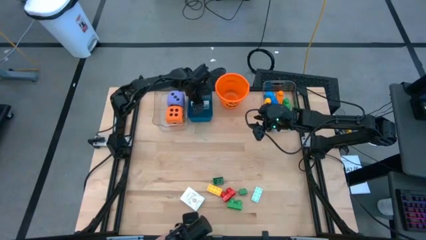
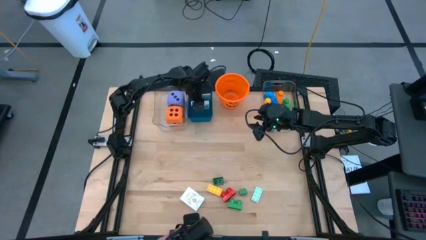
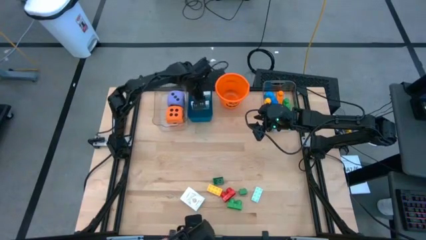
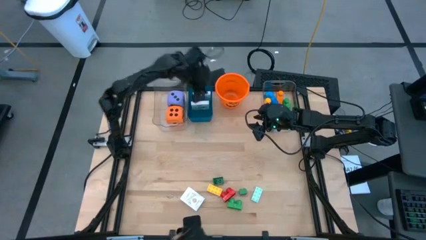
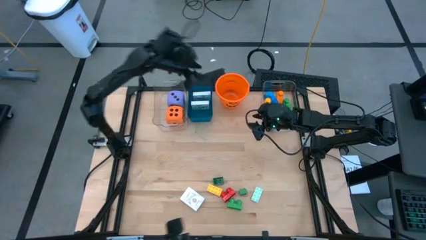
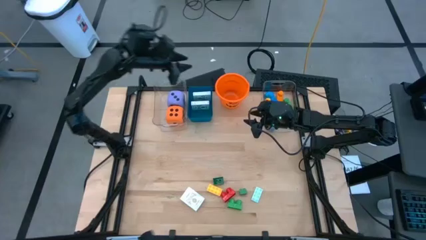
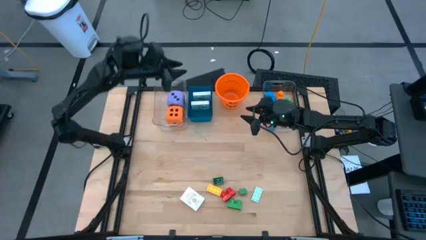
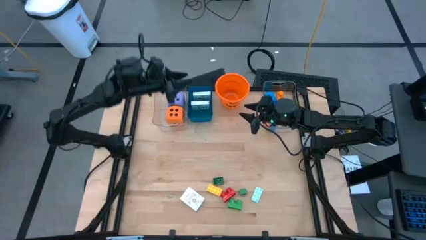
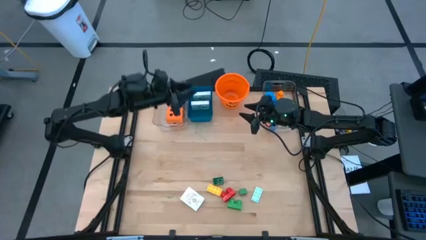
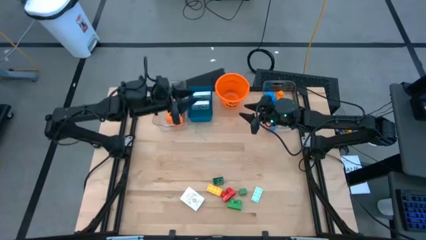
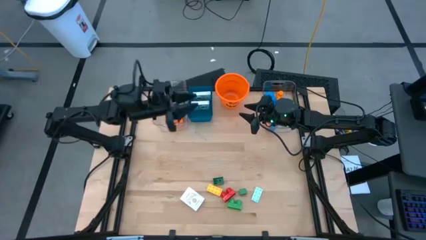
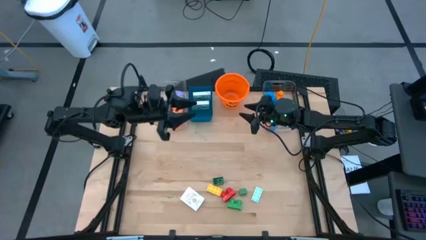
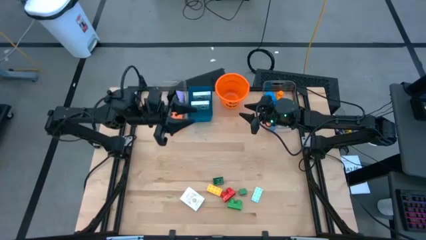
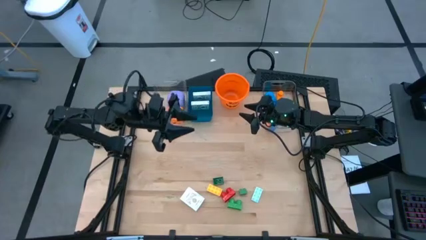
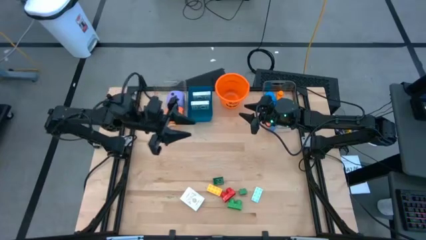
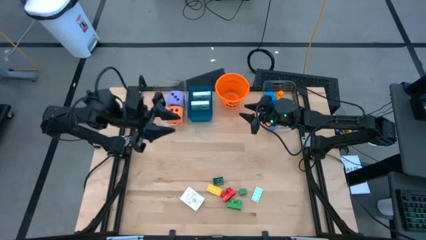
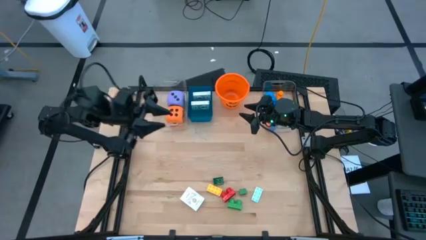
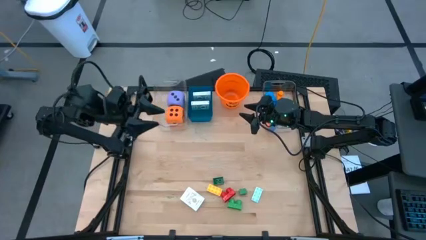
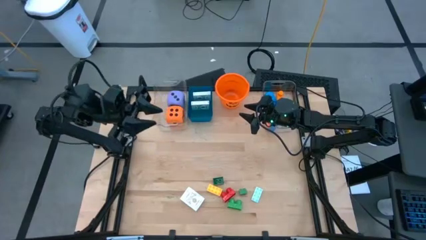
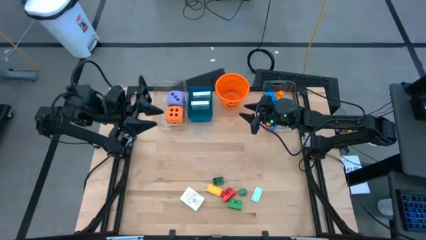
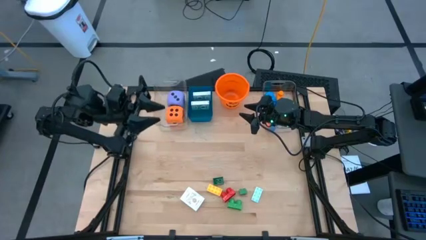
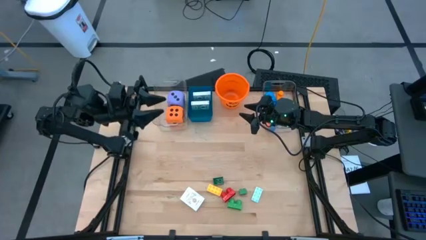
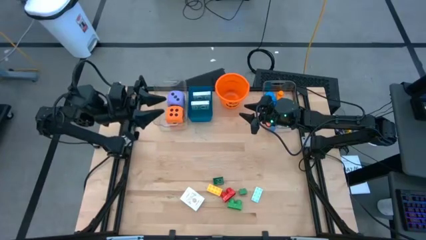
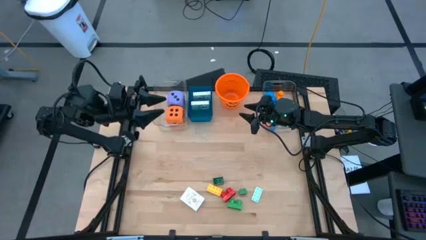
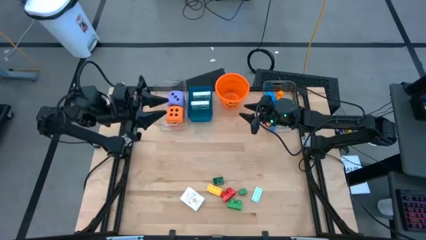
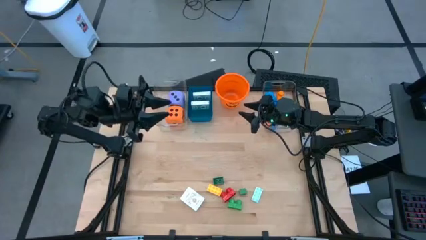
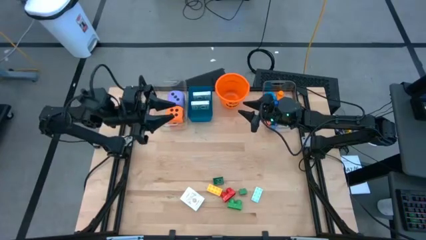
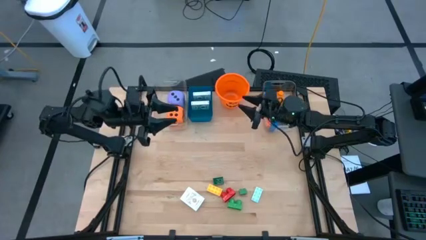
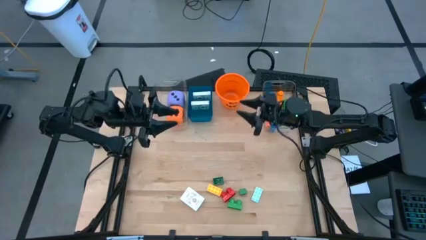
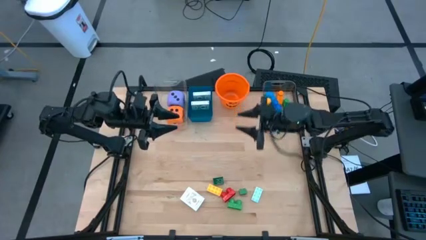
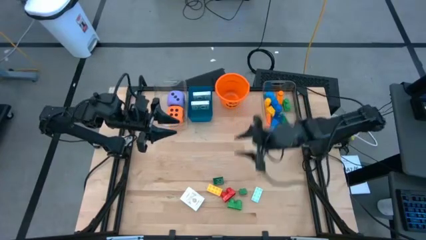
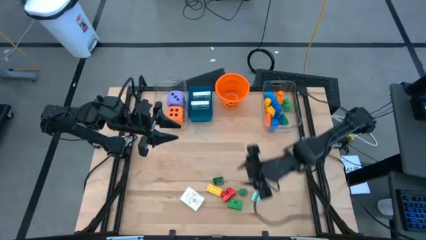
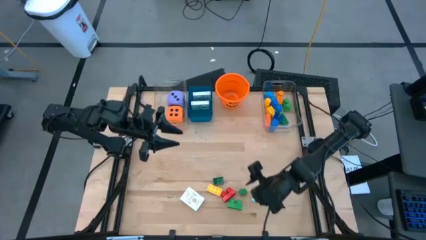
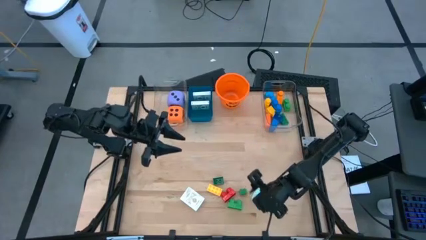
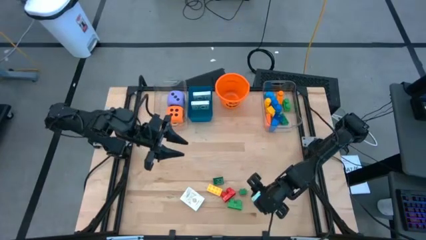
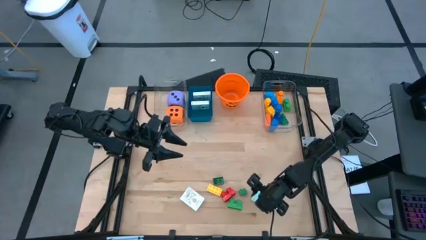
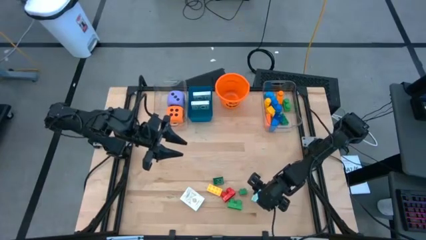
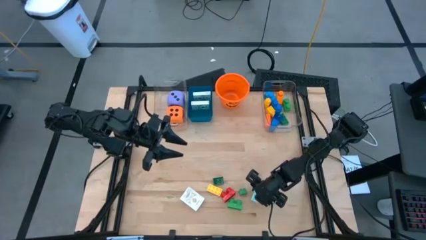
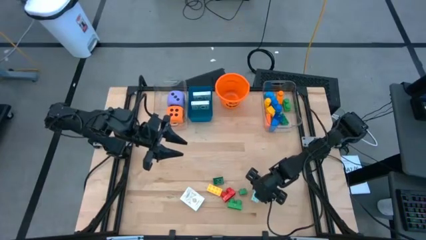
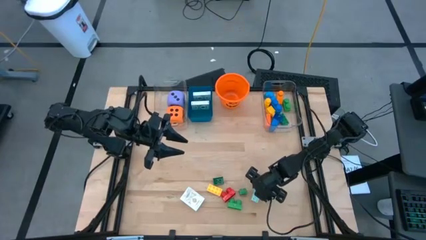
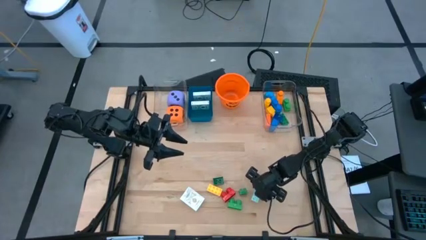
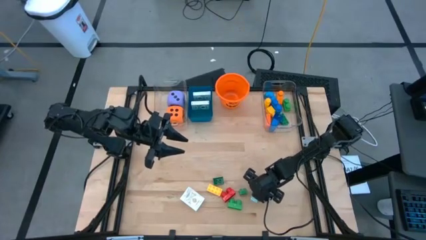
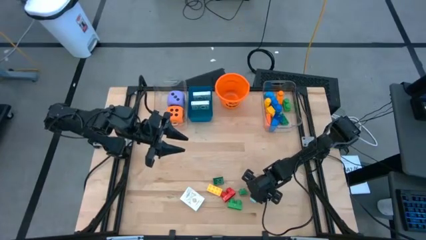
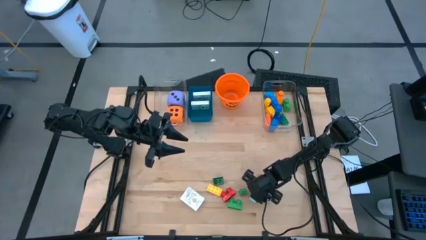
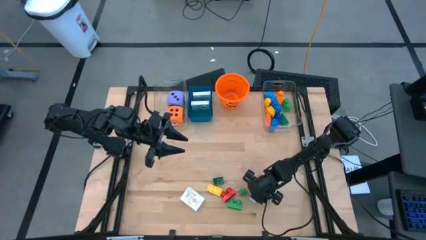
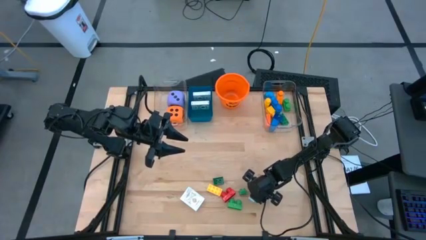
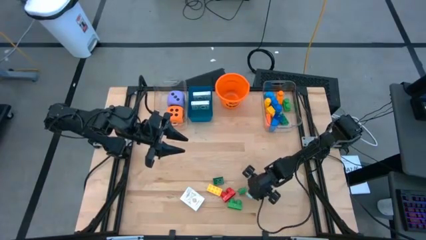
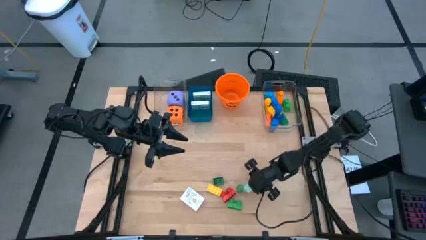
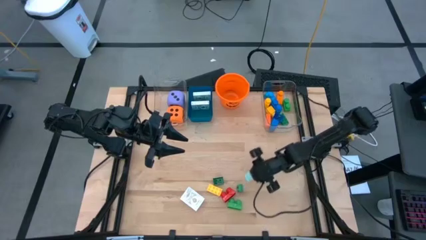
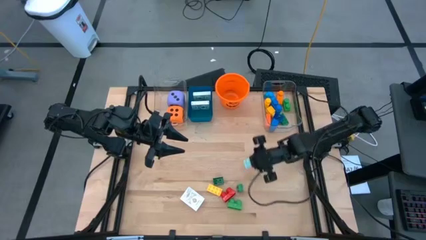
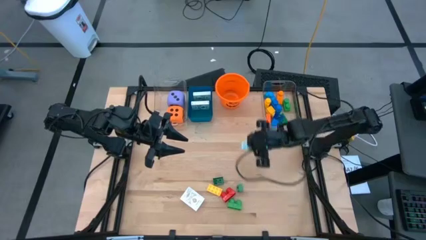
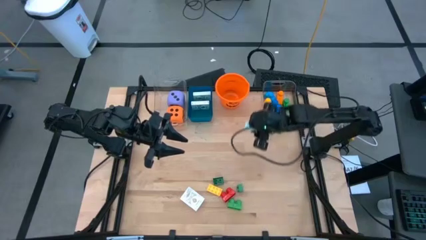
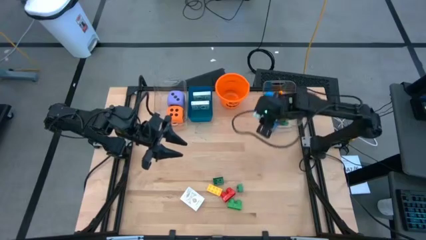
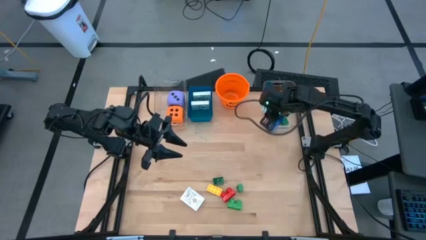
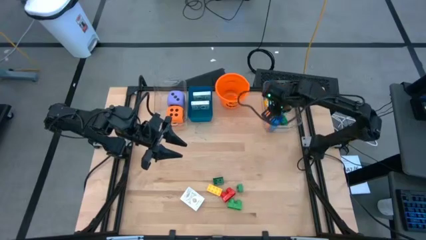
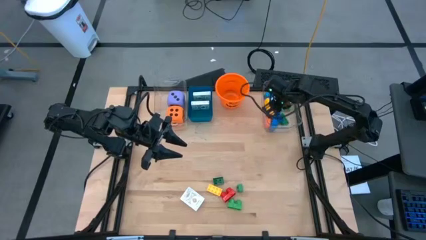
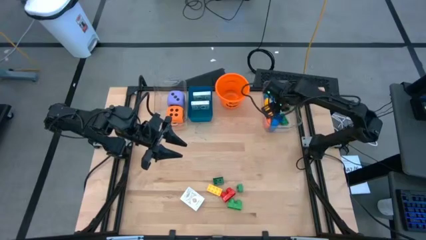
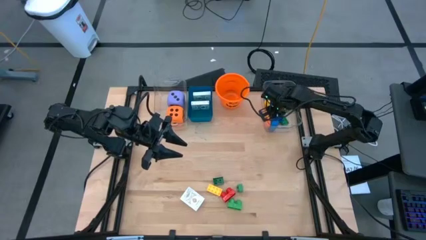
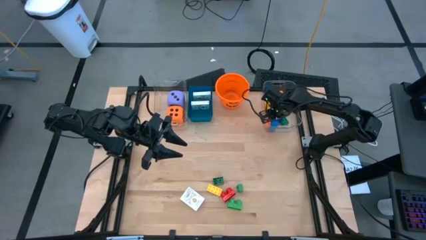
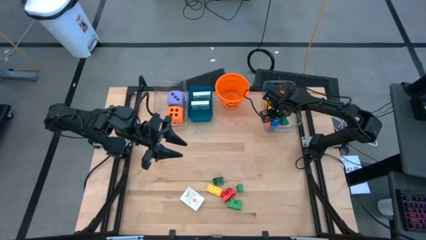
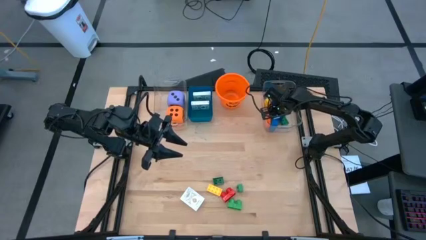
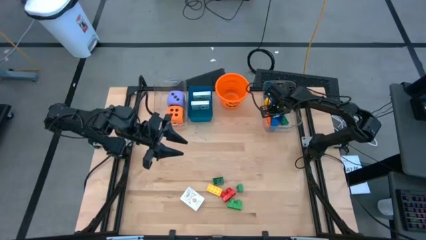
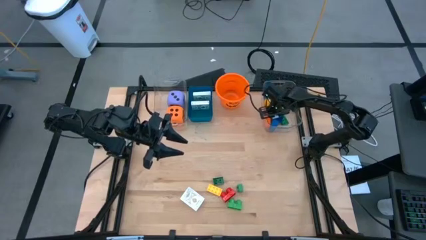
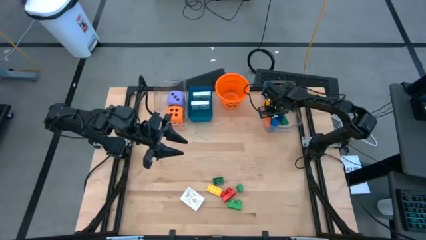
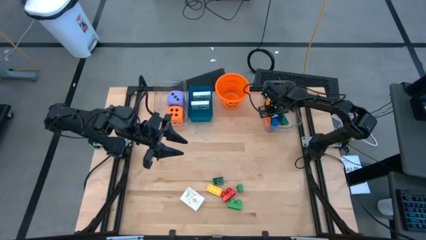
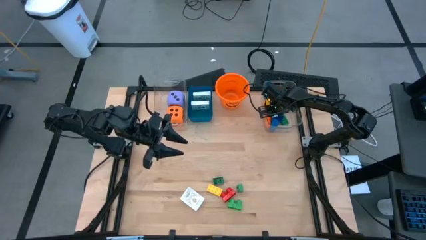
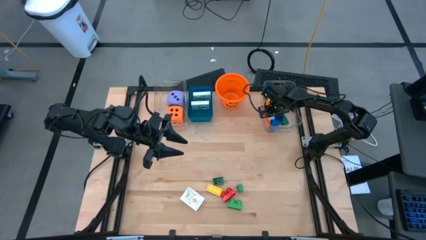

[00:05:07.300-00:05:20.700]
Task: Pick & Place Toys
Put the light blue game piece into the right transparent bin
